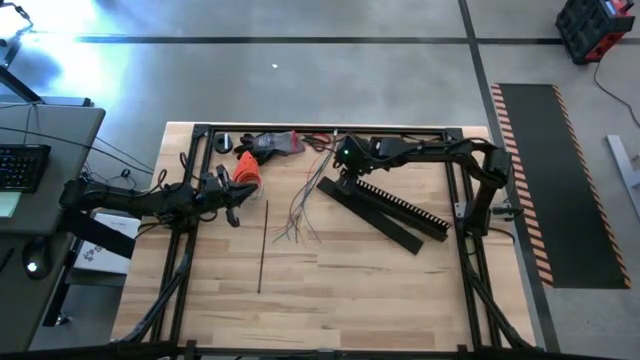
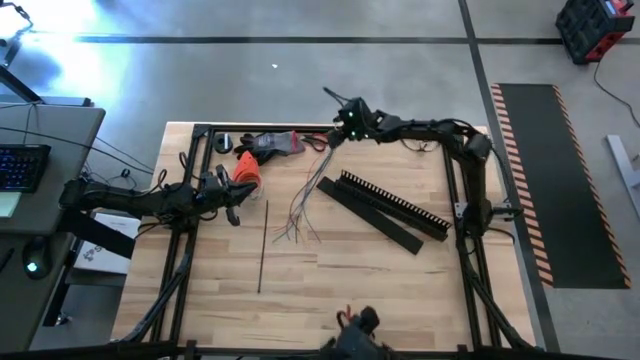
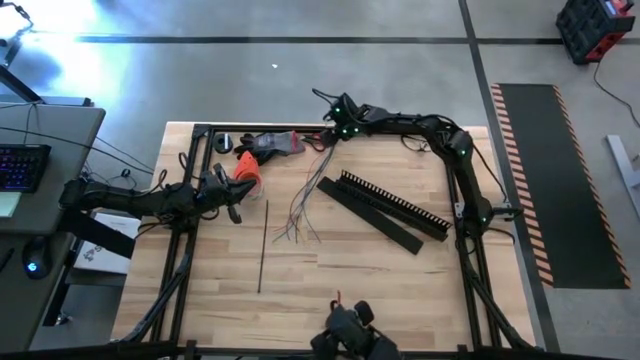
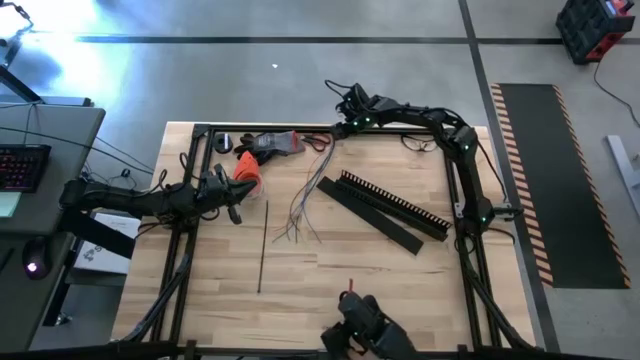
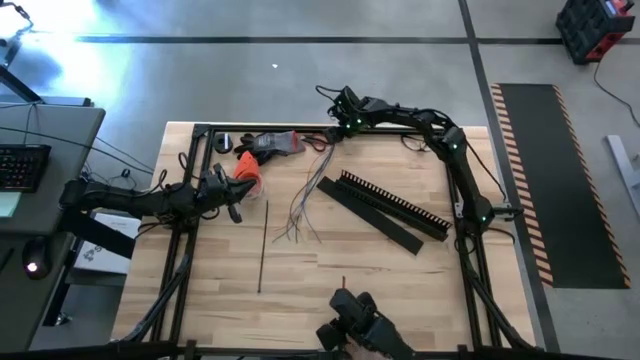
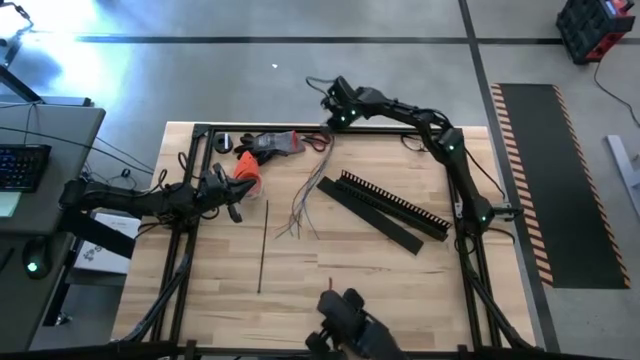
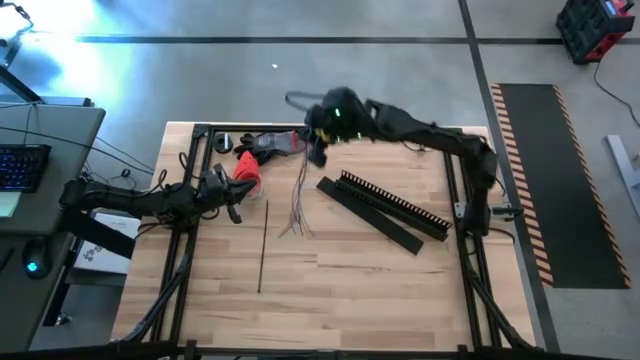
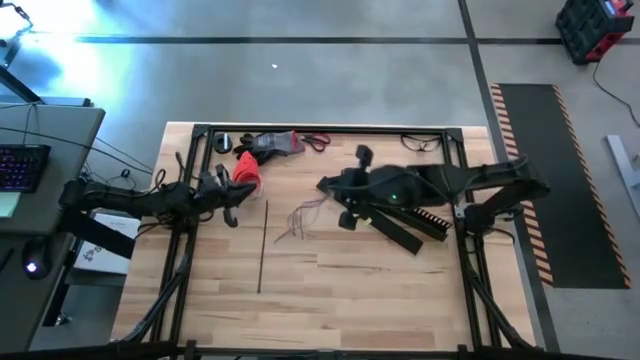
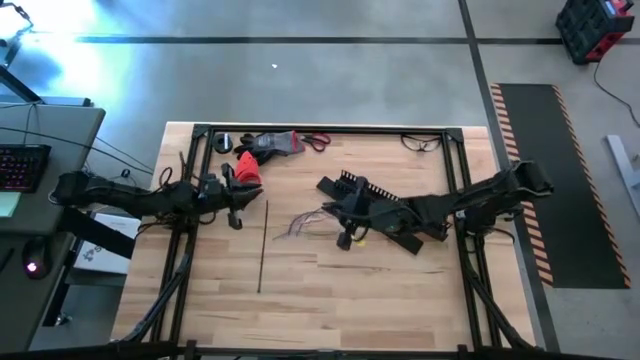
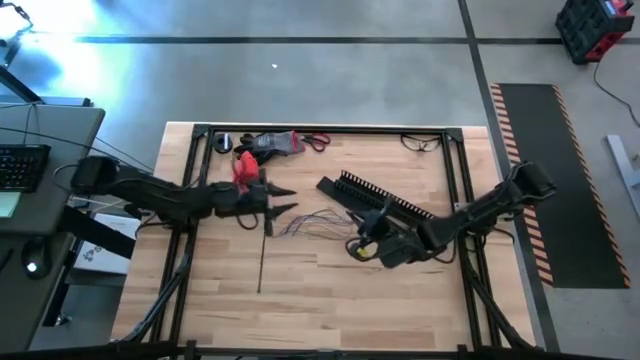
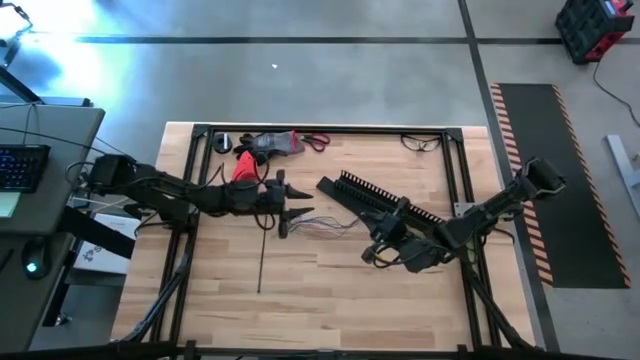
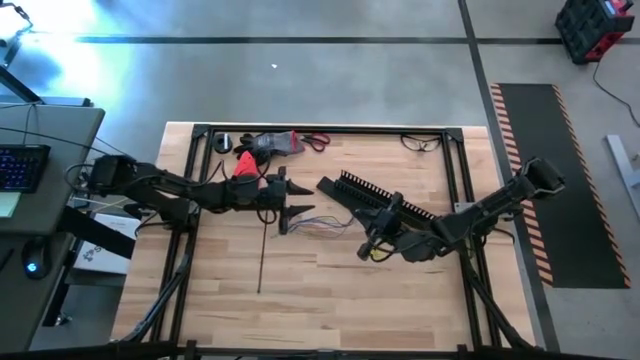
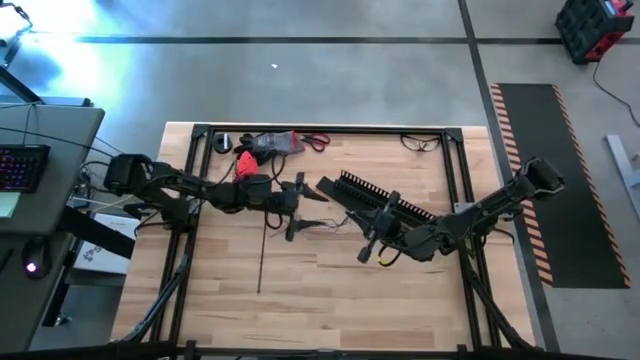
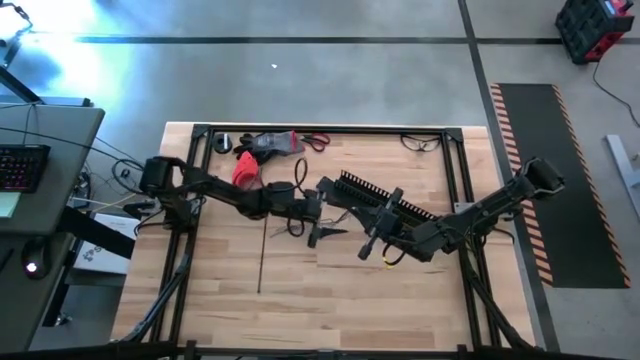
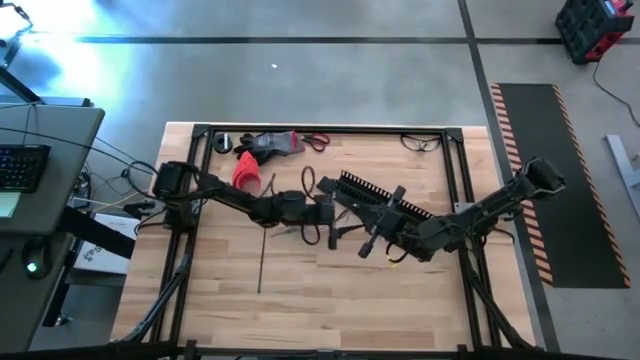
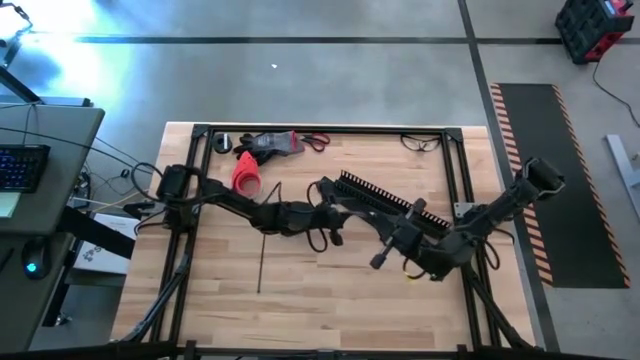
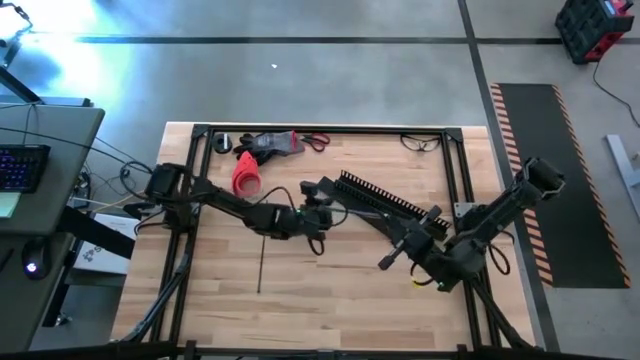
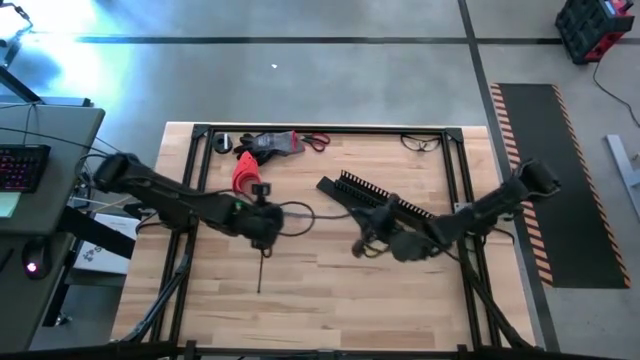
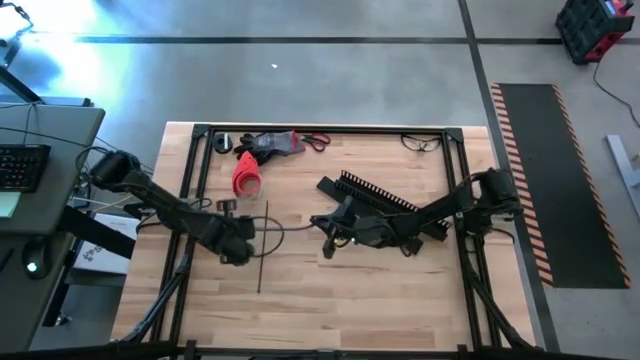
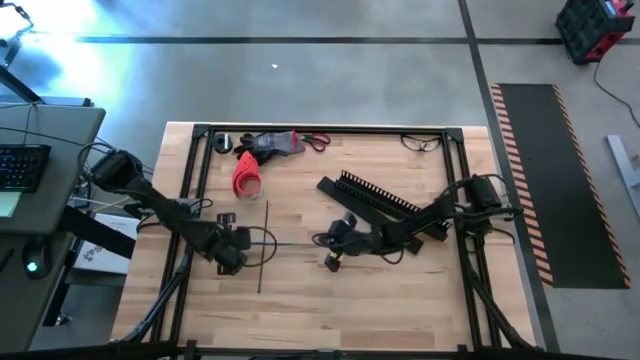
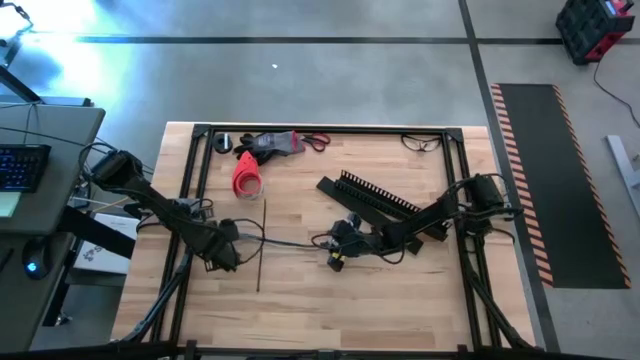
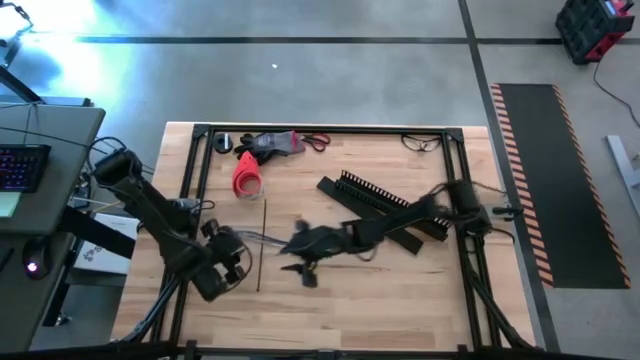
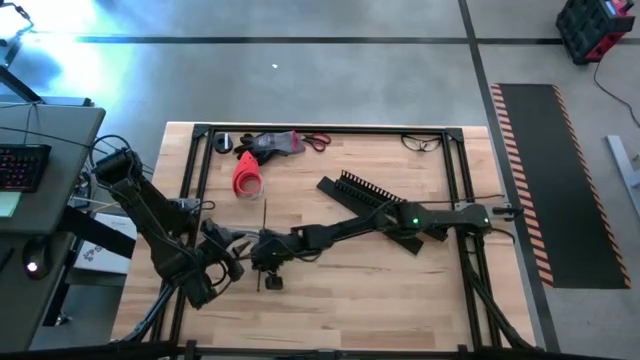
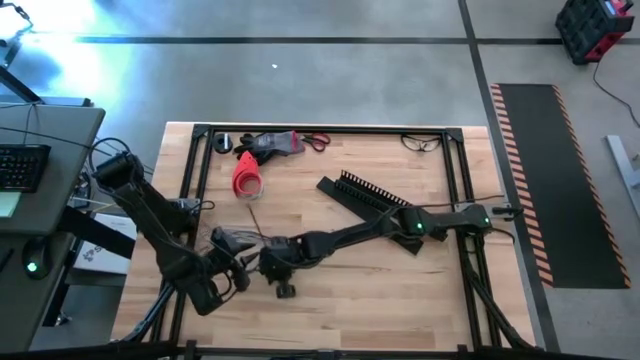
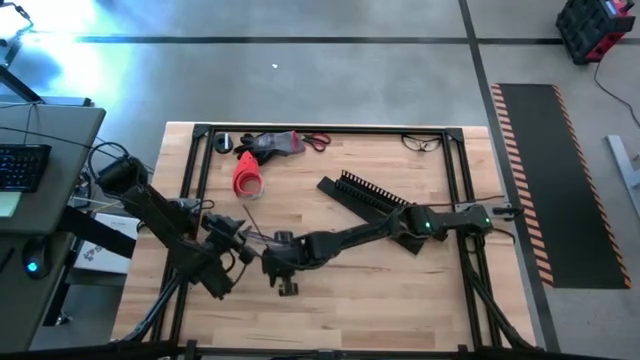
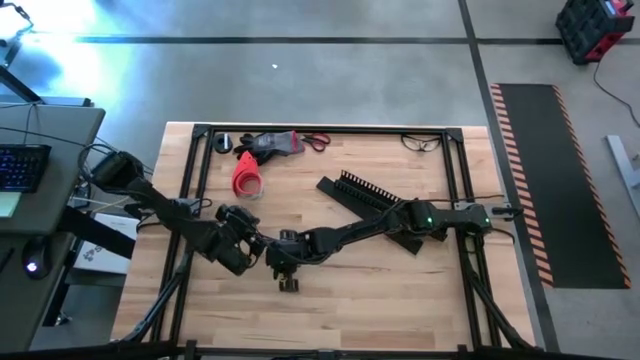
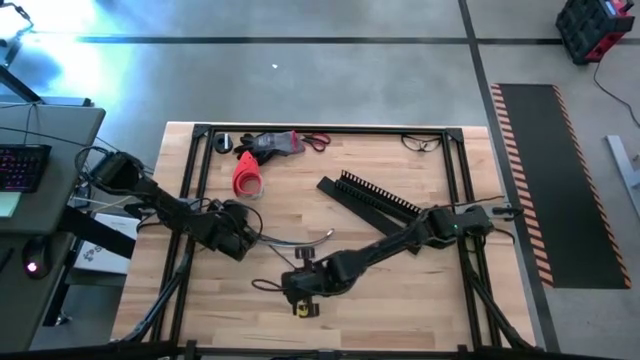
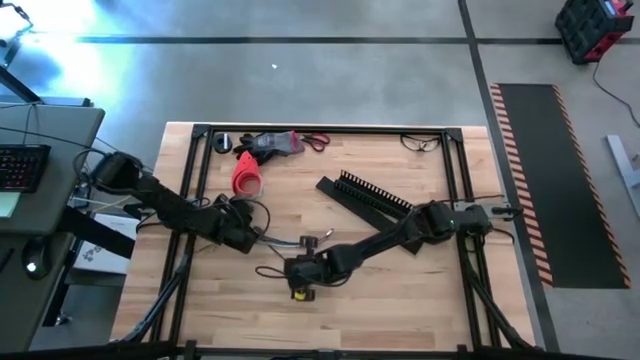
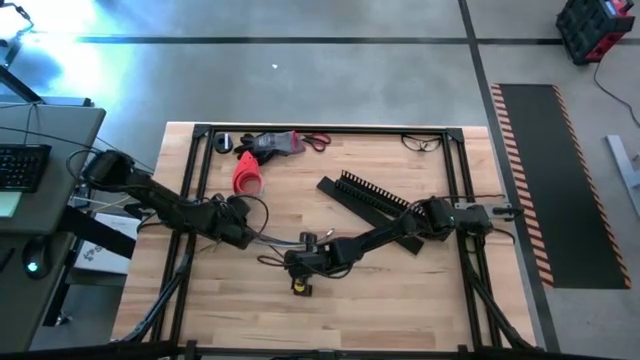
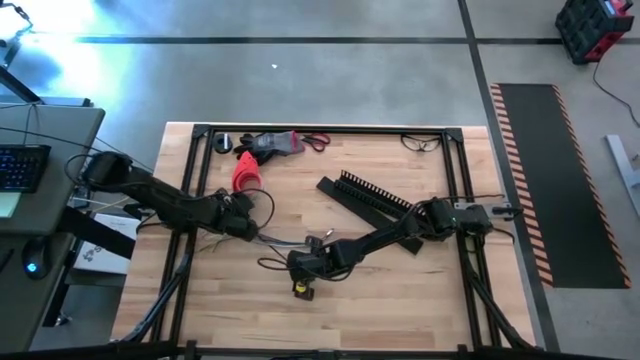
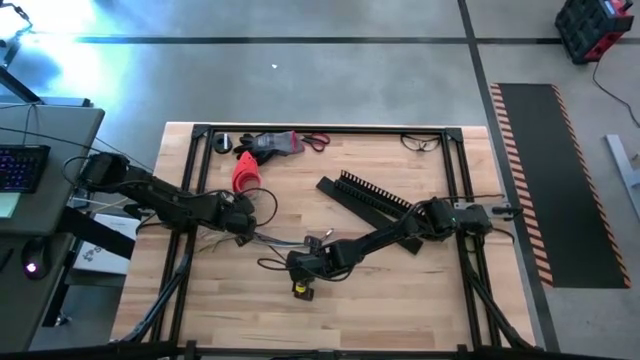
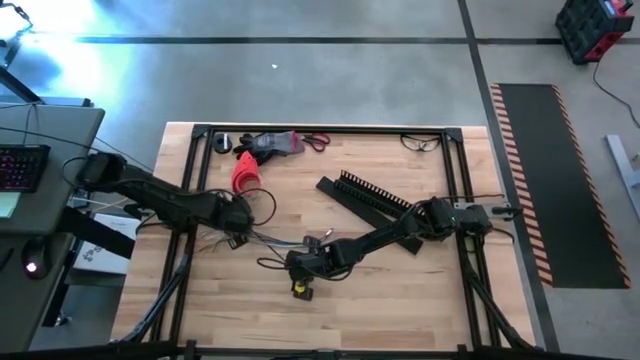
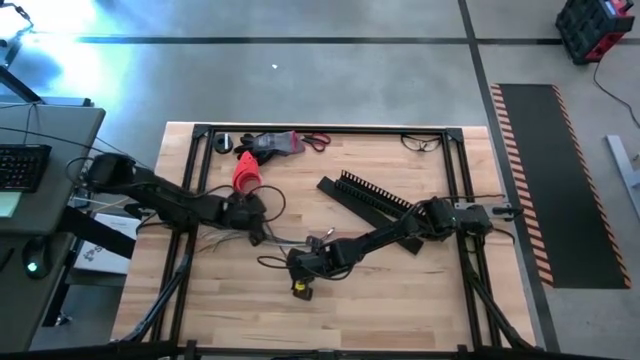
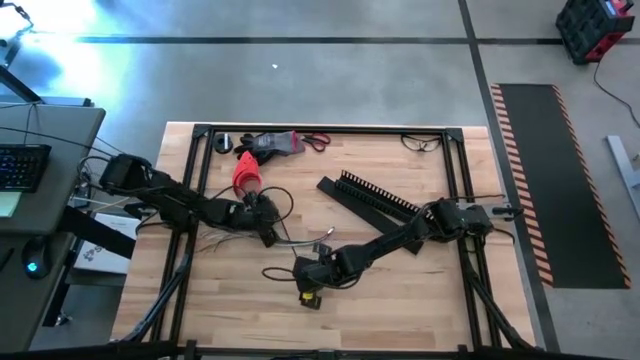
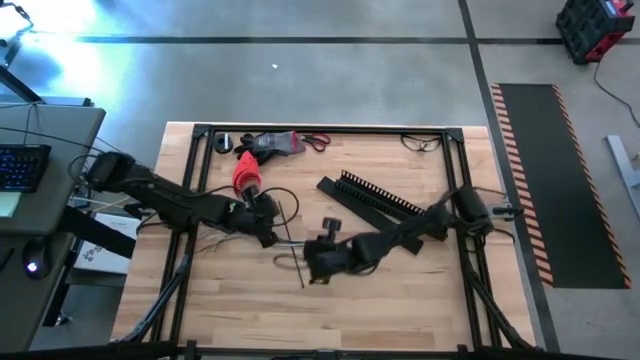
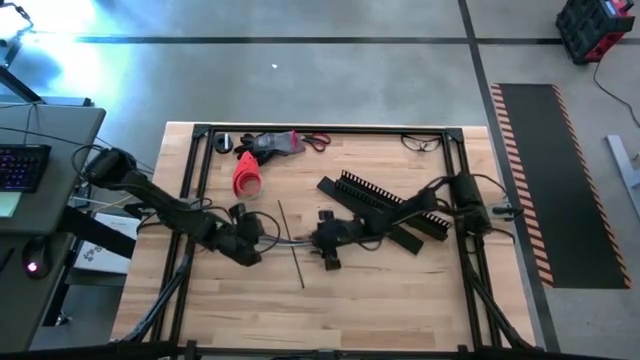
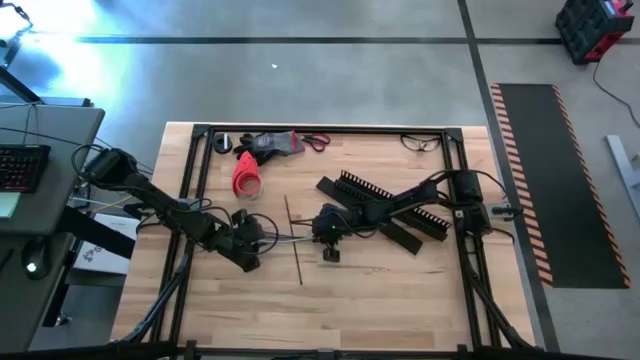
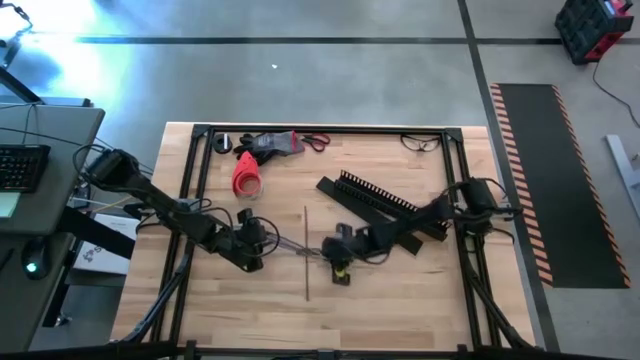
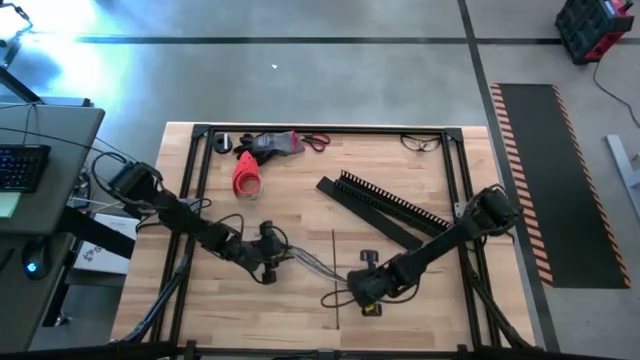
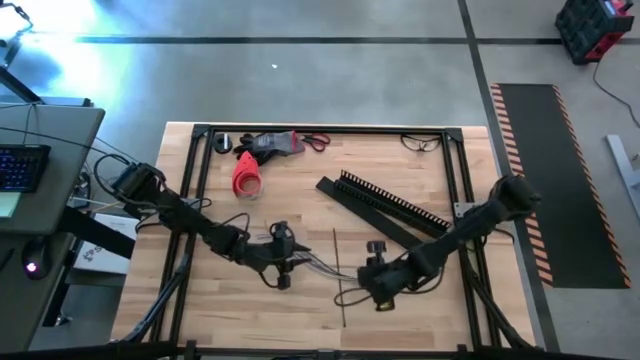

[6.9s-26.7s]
Task: Ziptie cables
Wrap the colored cables with the black zip tie
